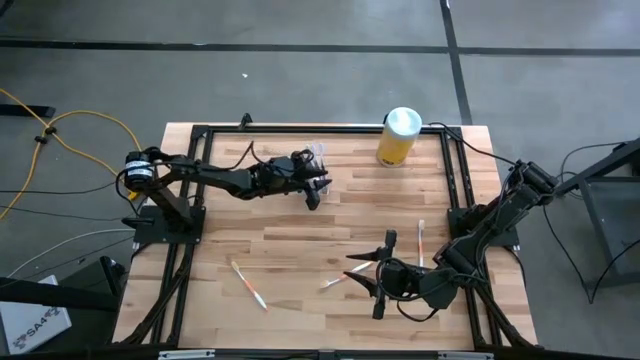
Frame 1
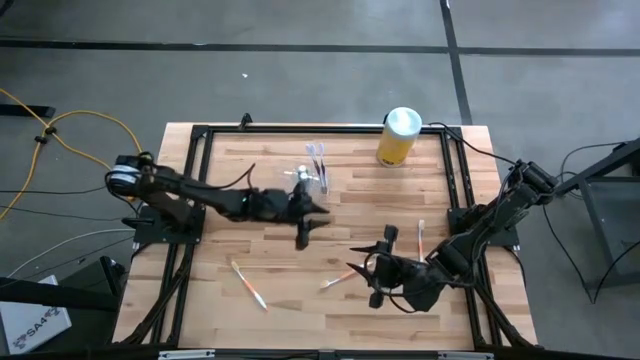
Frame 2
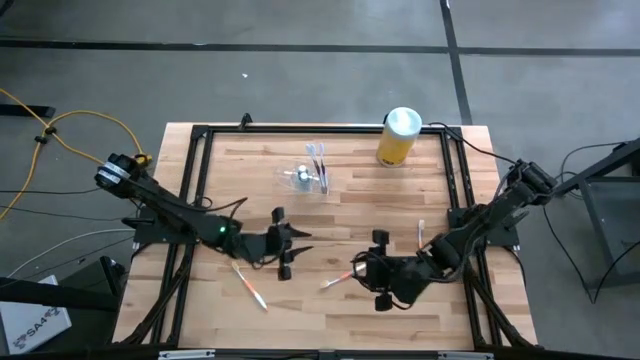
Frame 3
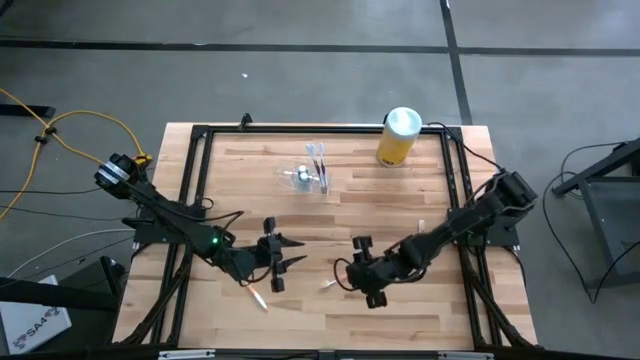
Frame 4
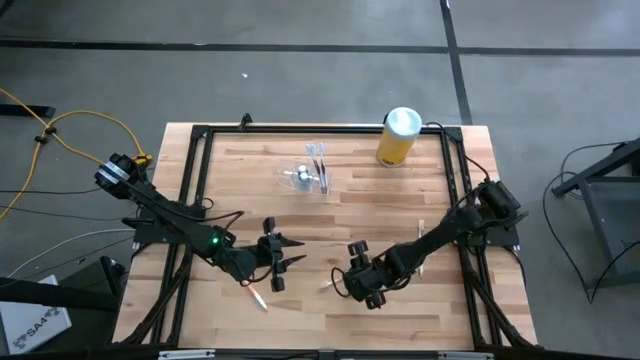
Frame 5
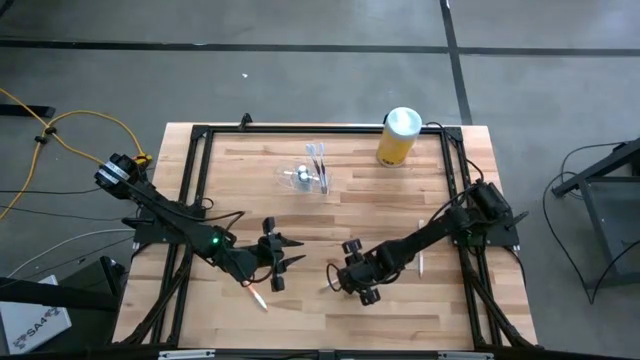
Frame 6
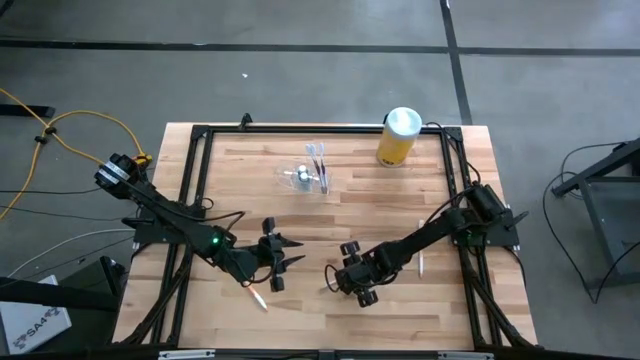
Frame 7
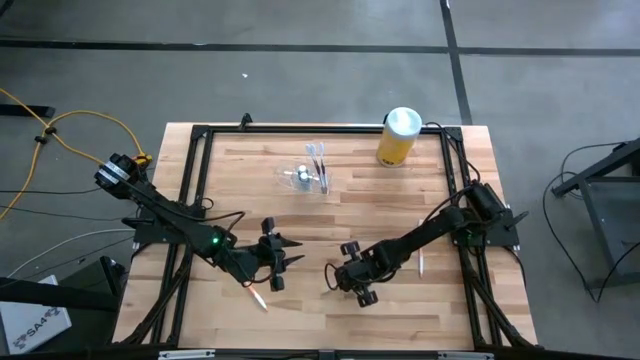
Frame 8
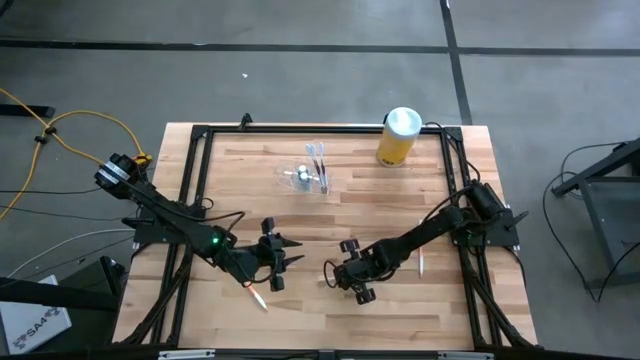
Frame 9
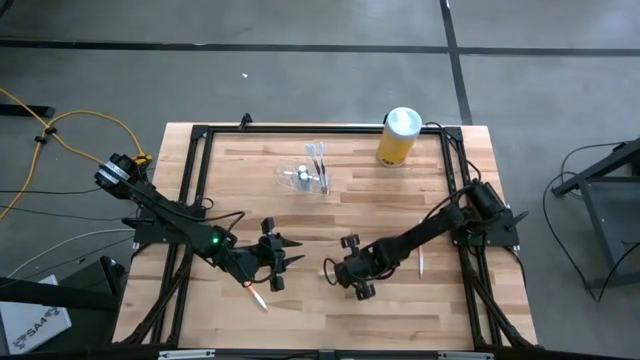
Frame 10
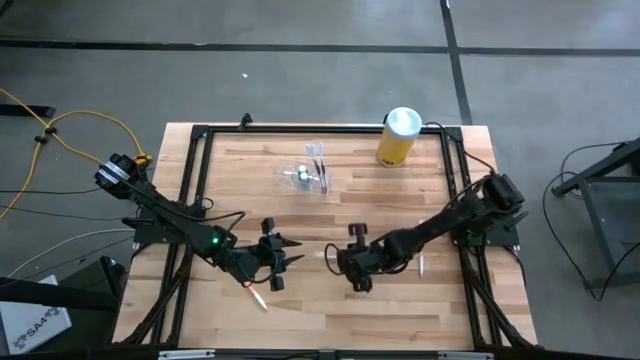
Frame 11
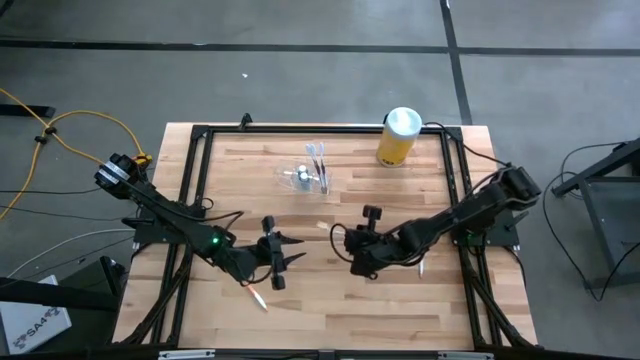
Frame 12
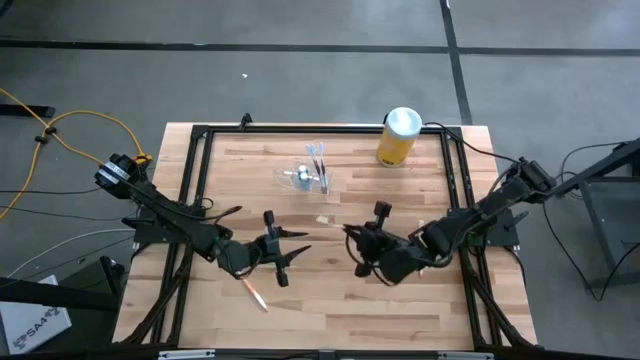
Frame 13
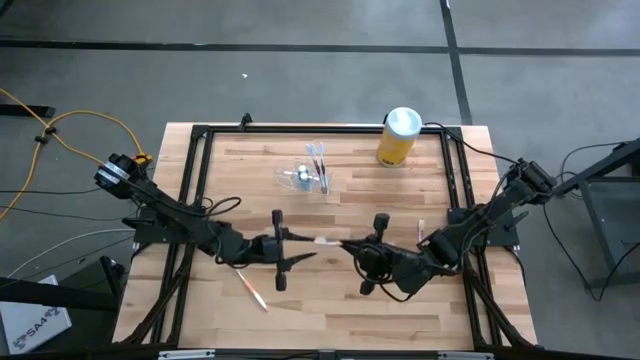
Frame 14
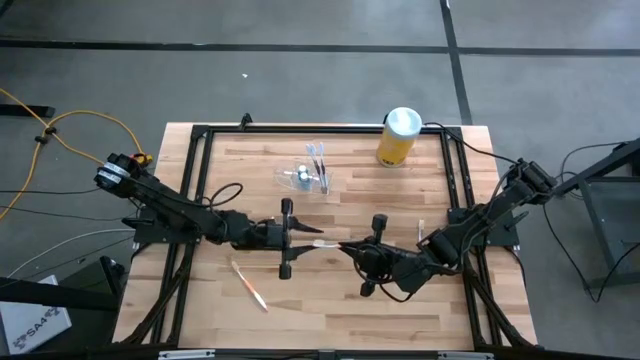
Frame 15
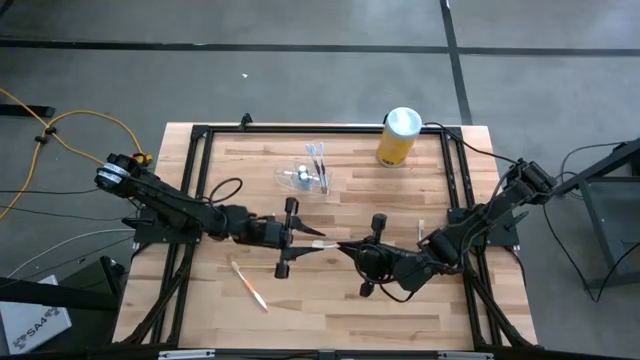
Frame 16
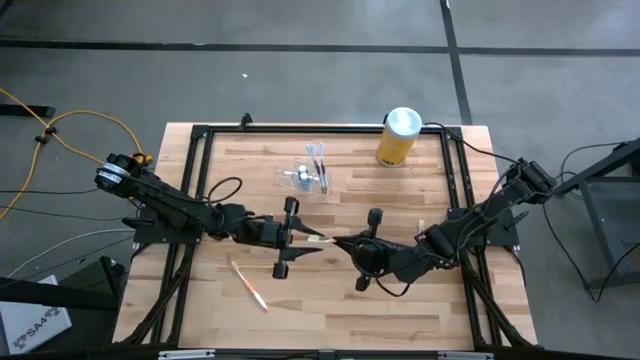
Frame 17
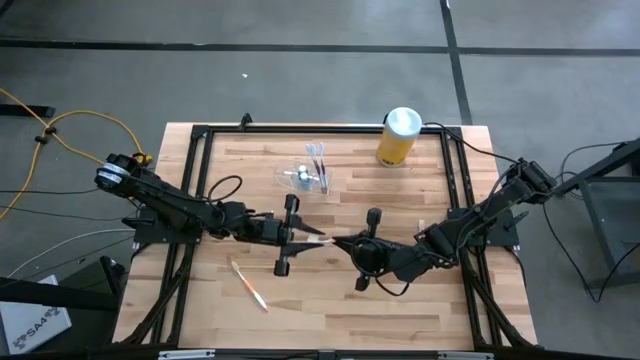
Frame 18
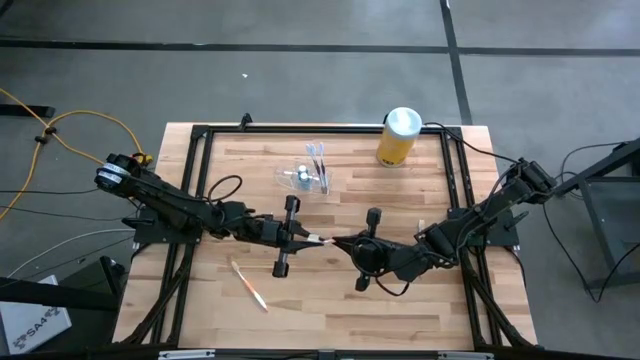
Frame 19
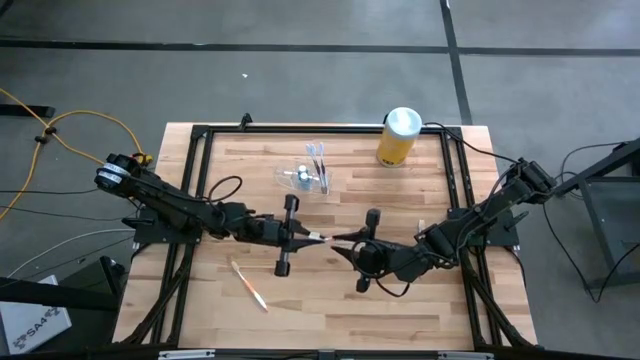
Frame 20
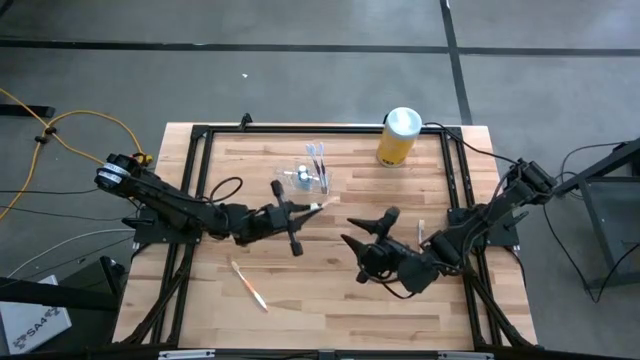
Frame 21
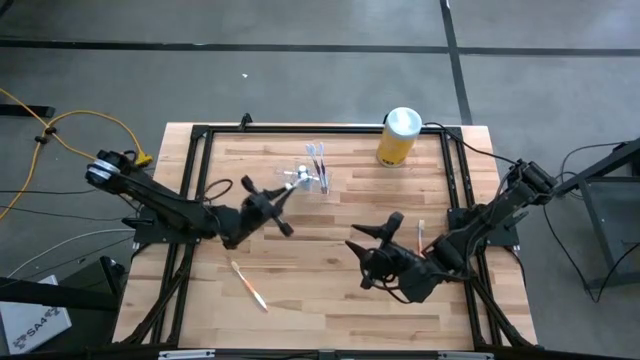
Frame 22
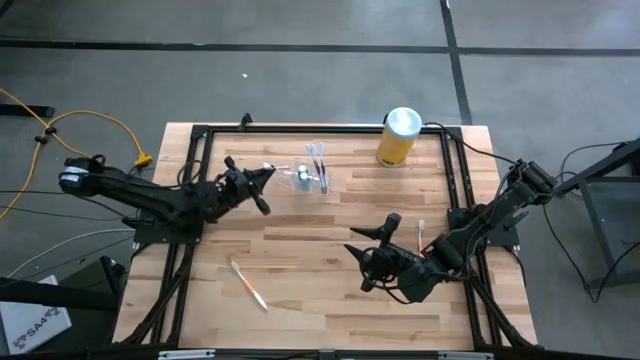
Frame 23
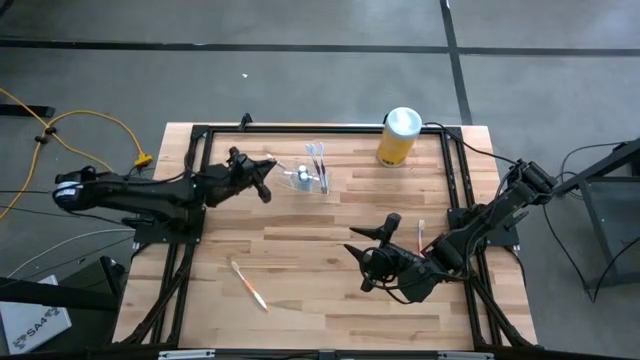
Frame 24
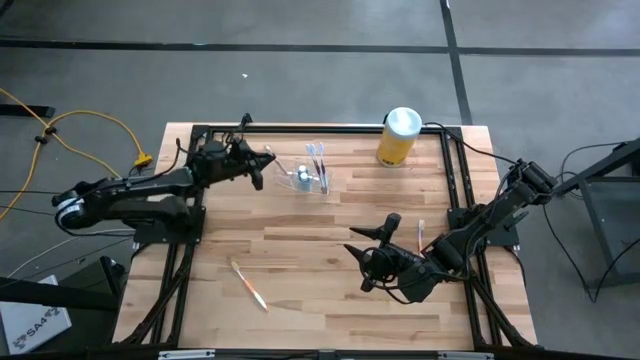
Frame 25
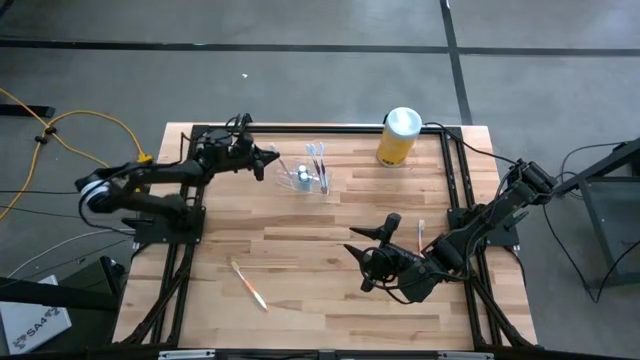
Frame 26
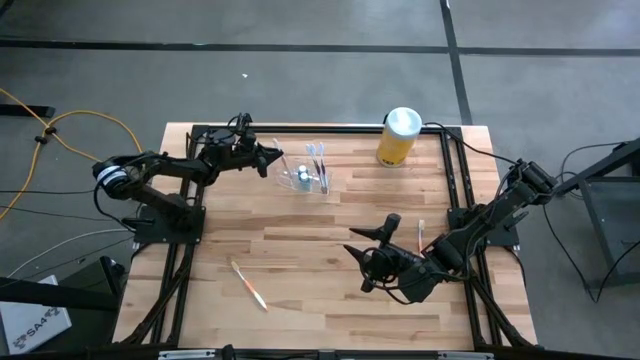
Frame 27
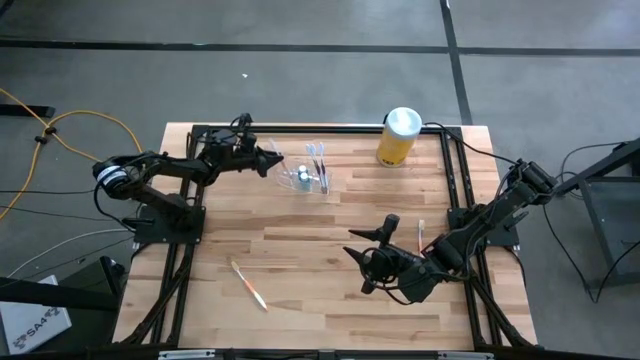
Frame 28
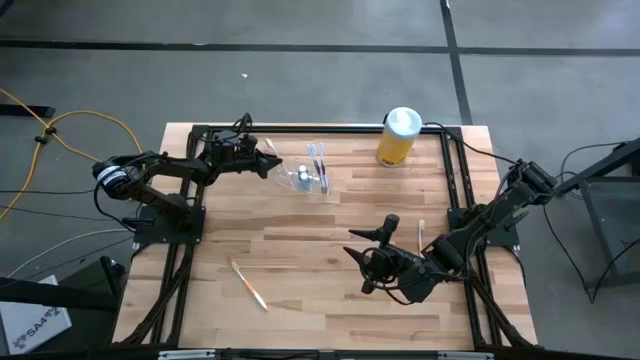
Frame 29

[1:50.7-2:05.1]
Task: Pick & Place toothbrushing station
Put the middle orange toothbrush into the transparent organizer

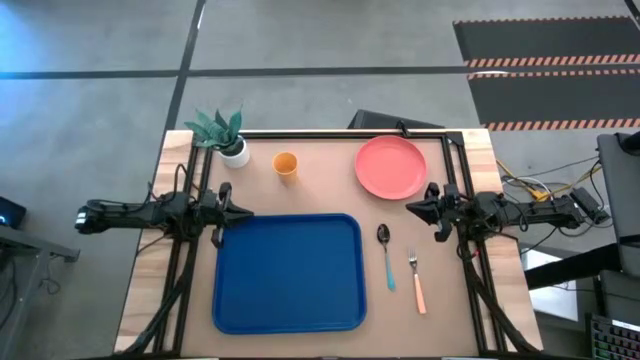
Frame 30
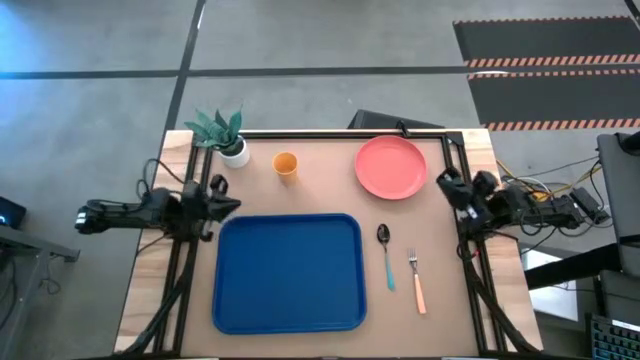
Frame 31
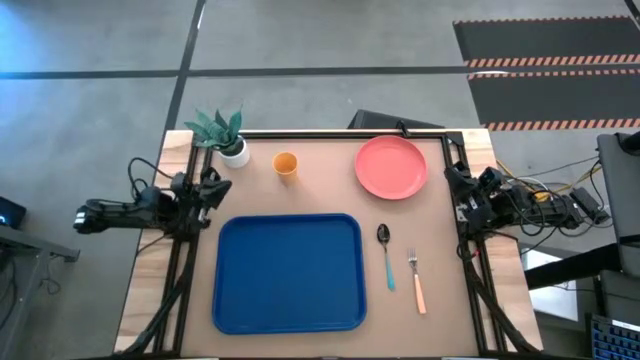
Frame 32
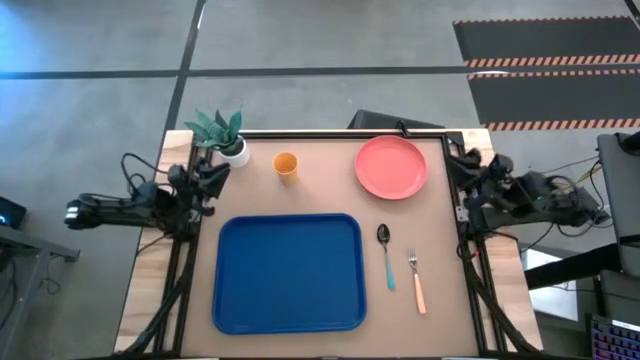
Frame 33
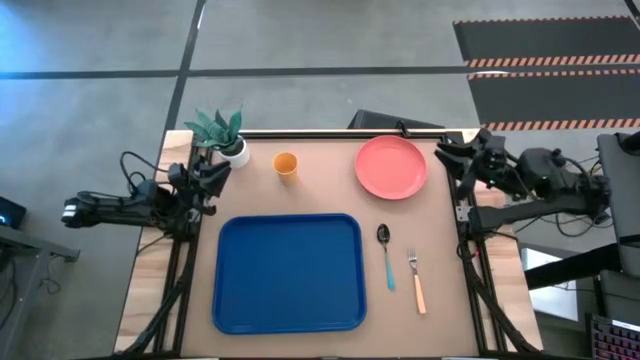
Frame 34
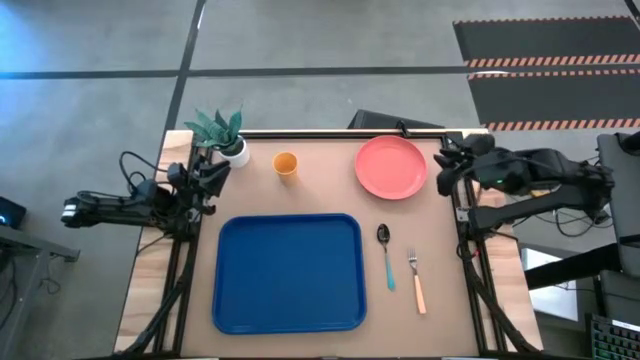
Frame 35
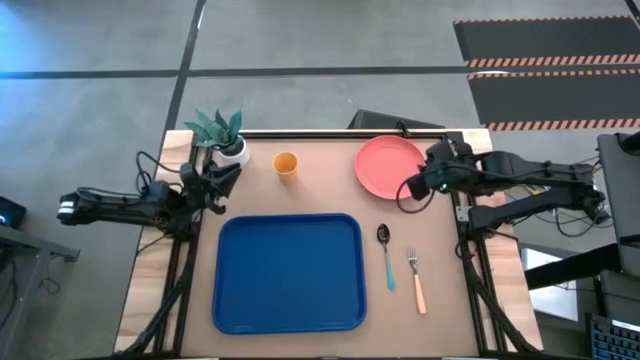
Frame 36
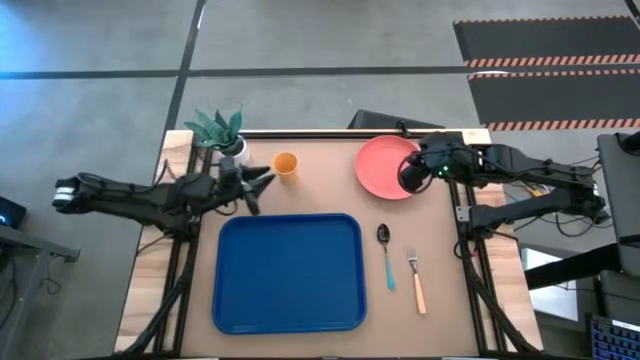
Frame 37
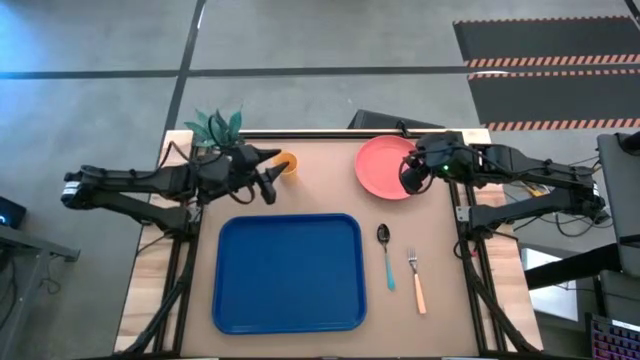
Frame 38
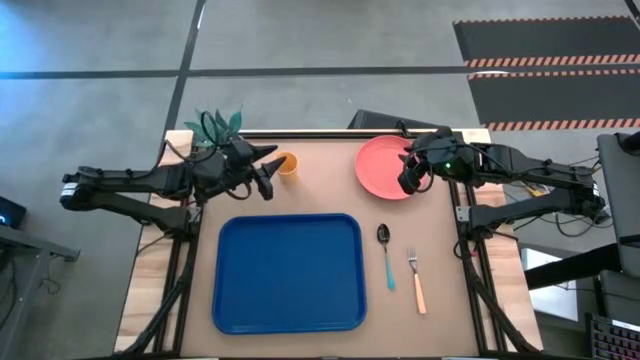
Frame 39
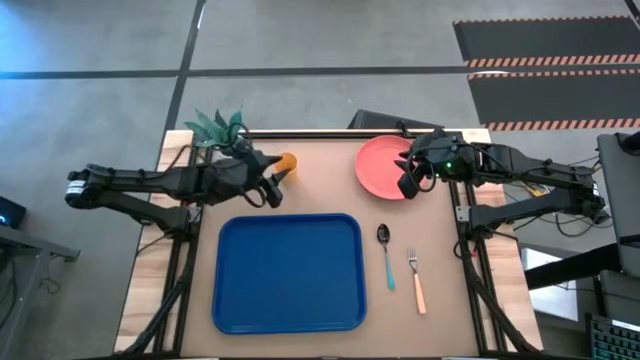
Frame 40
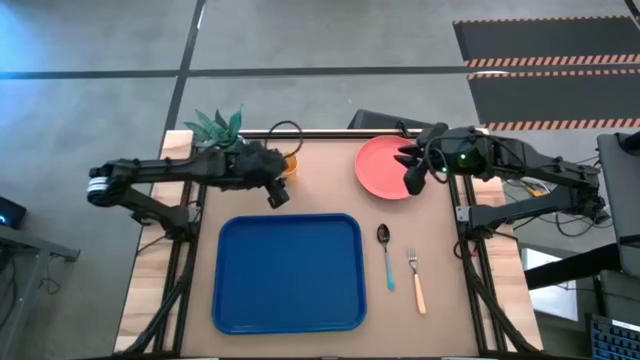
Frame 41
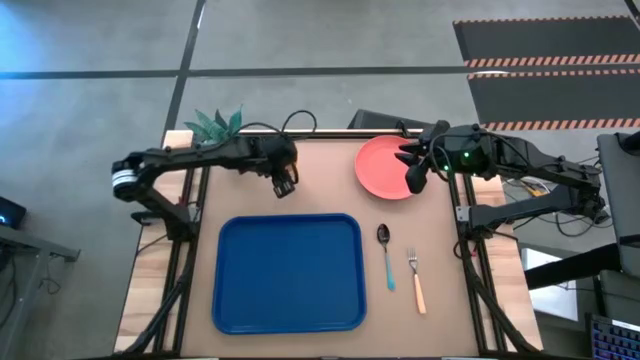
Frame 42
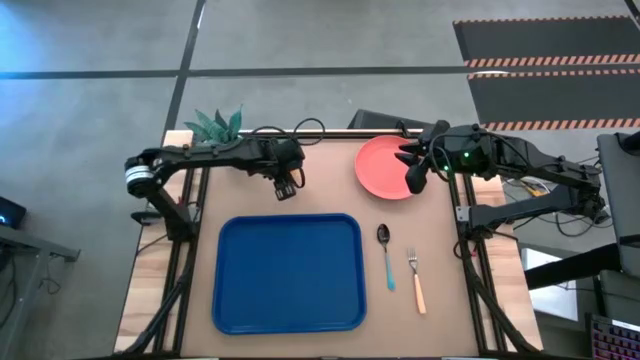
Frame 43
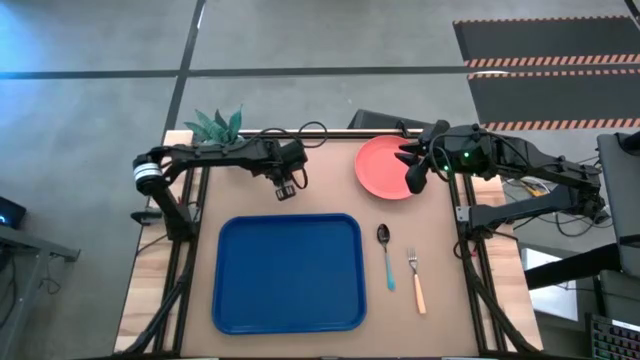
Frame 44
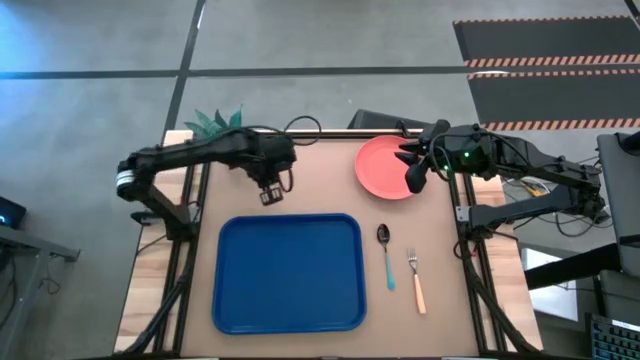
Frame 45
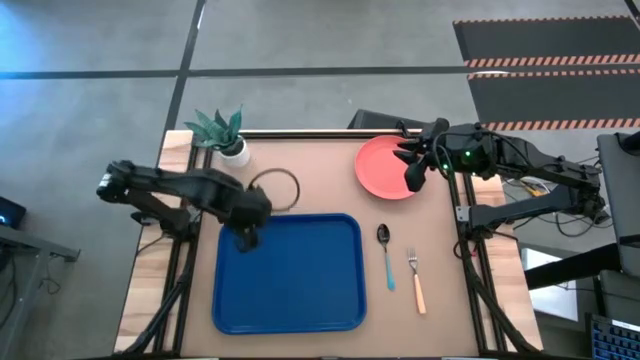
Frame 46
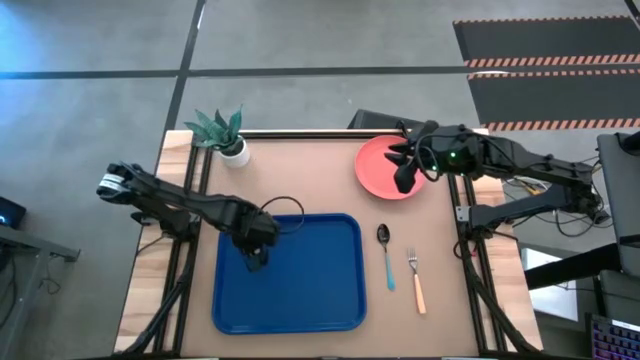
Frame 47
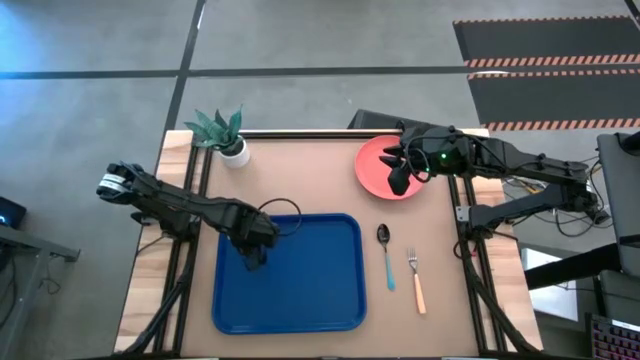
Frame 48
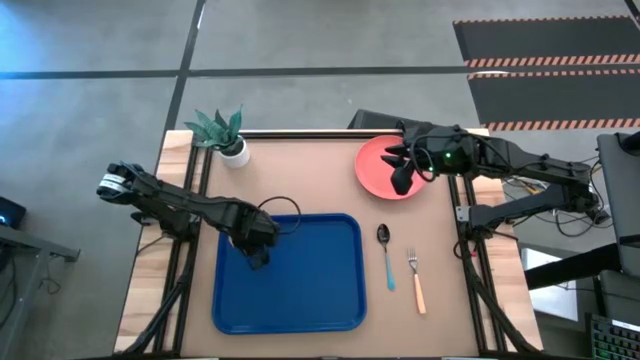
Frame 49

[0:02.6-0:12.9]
Task: Pick and place plate/cup/fork/spoon on tray
Put the yellow cup on the blue tray
